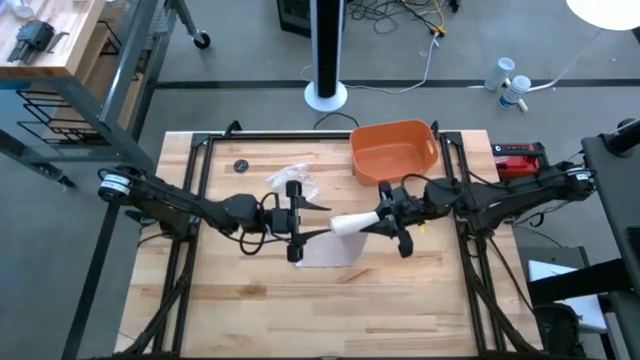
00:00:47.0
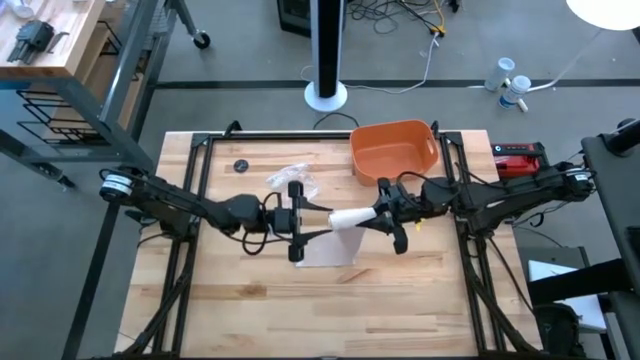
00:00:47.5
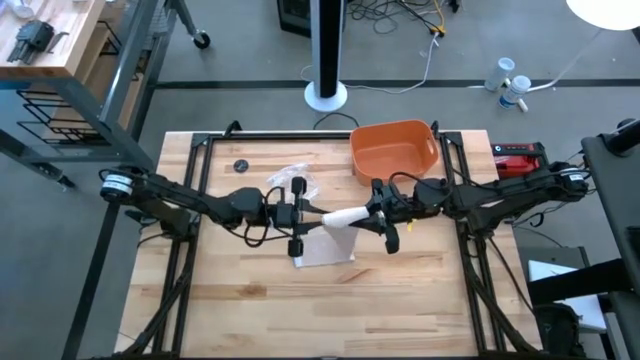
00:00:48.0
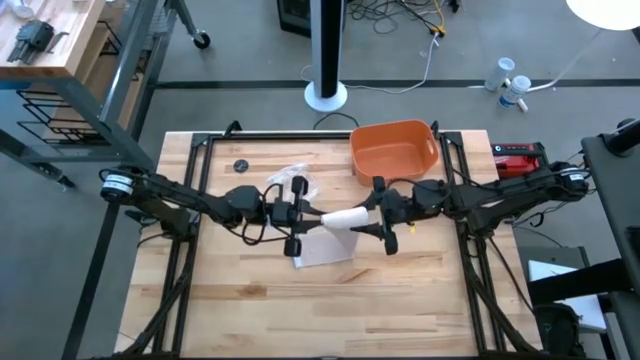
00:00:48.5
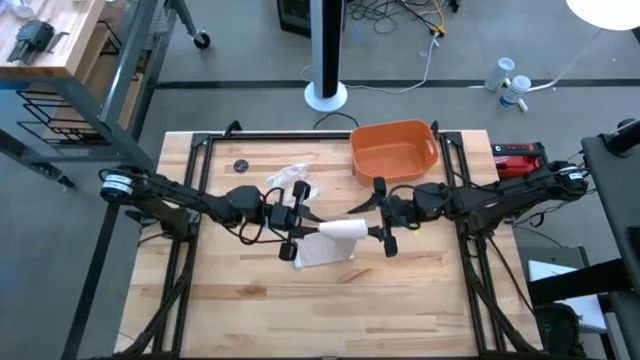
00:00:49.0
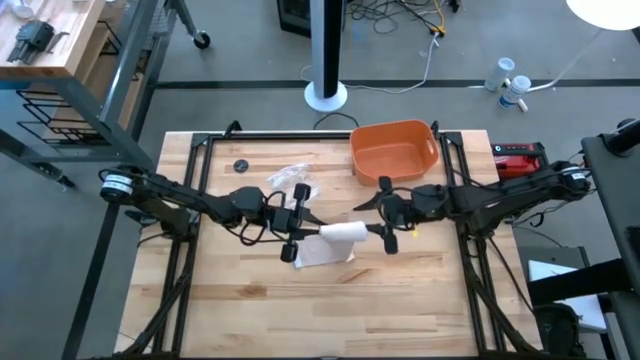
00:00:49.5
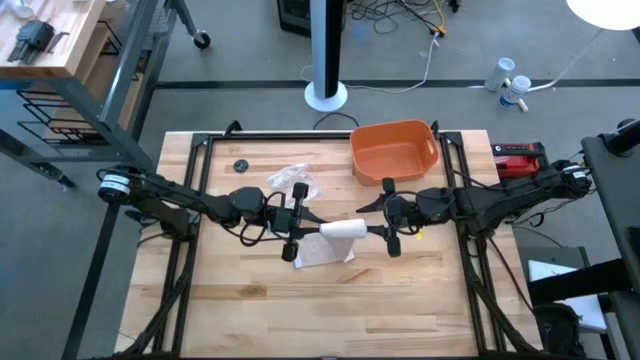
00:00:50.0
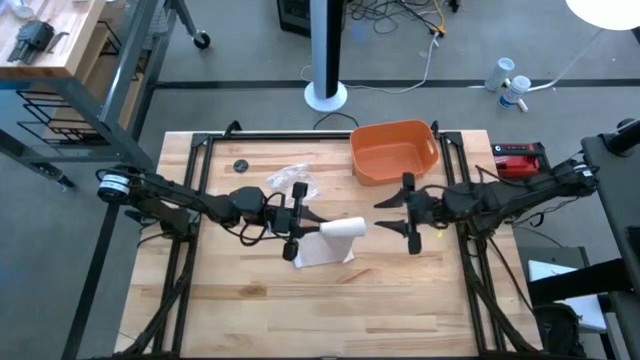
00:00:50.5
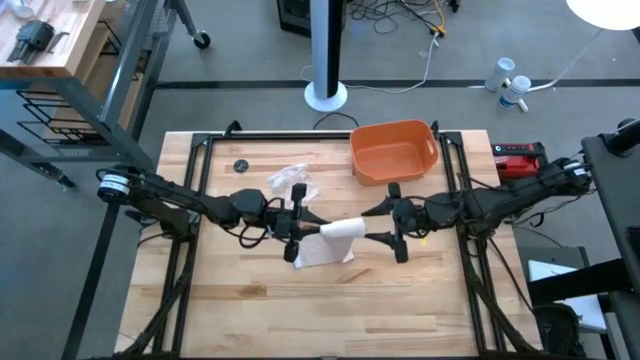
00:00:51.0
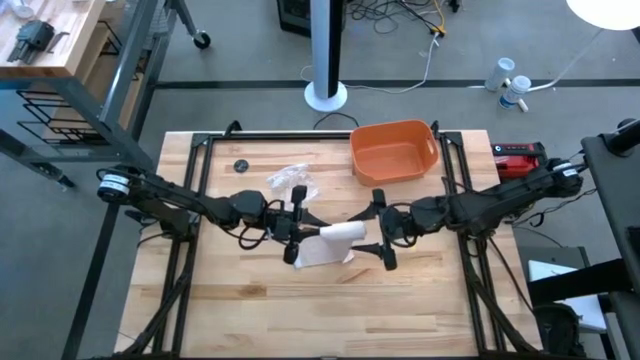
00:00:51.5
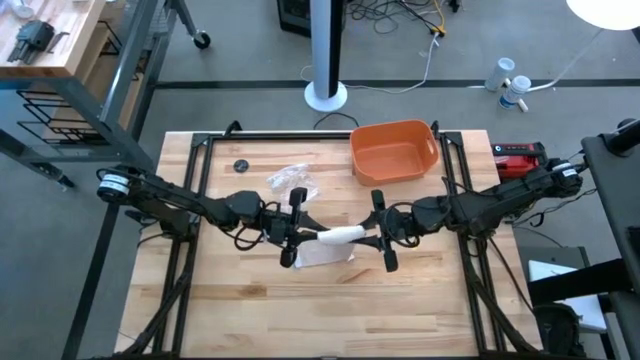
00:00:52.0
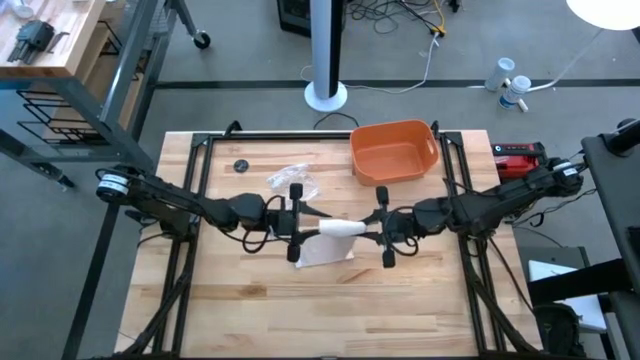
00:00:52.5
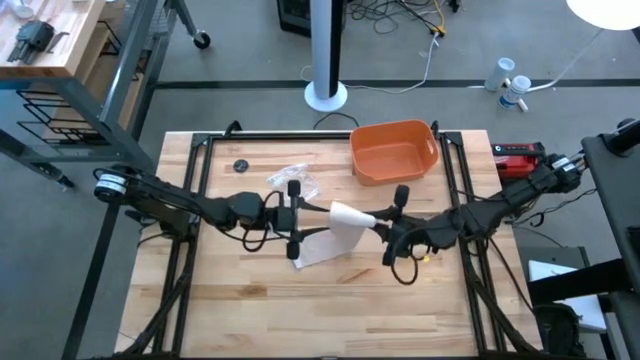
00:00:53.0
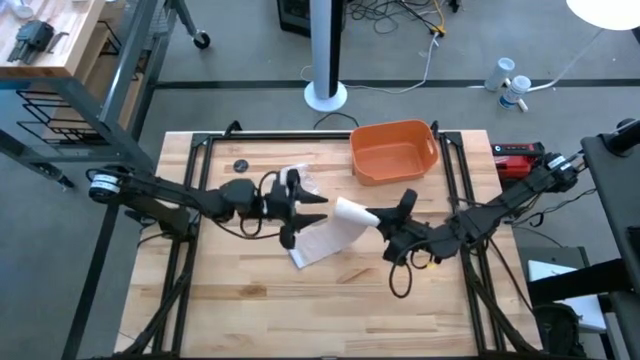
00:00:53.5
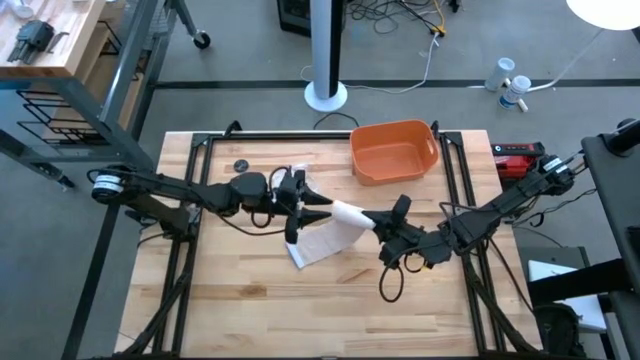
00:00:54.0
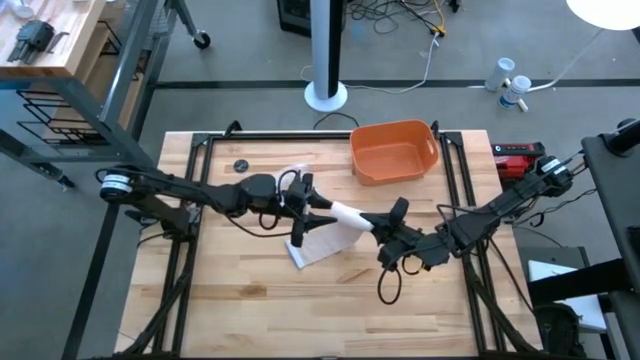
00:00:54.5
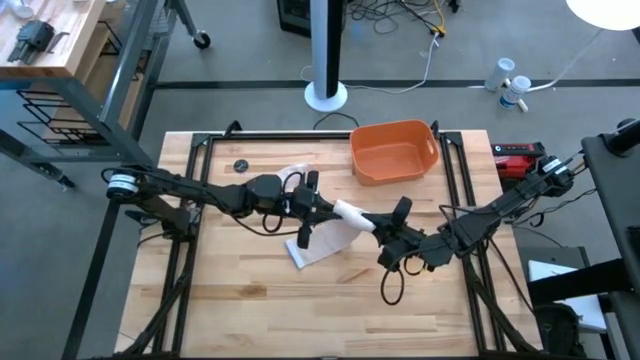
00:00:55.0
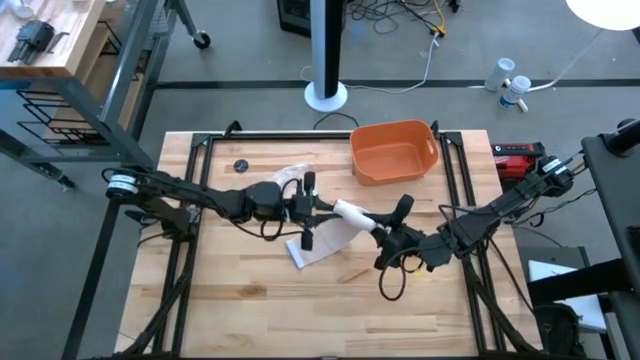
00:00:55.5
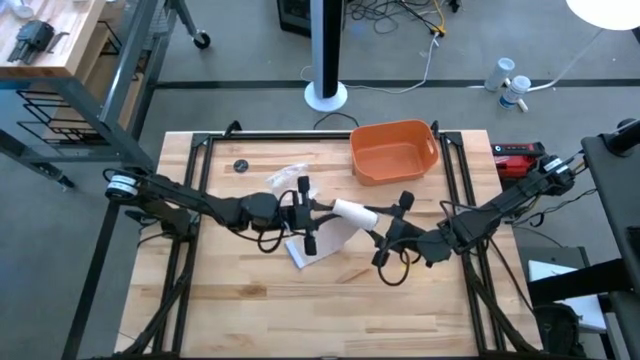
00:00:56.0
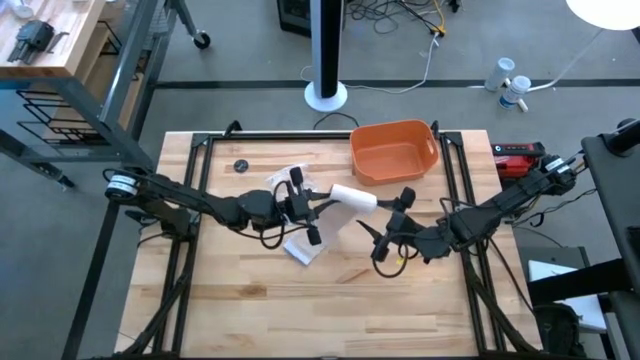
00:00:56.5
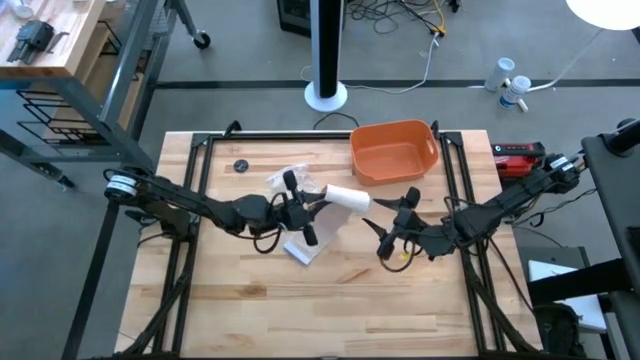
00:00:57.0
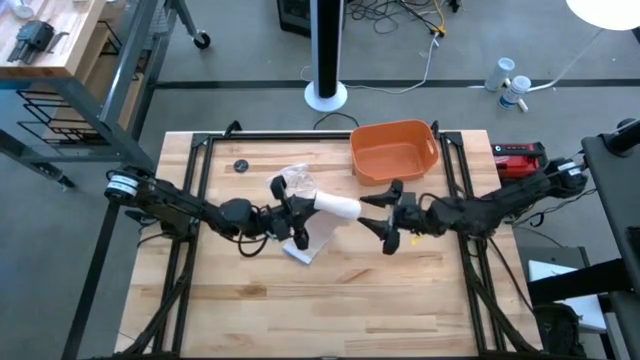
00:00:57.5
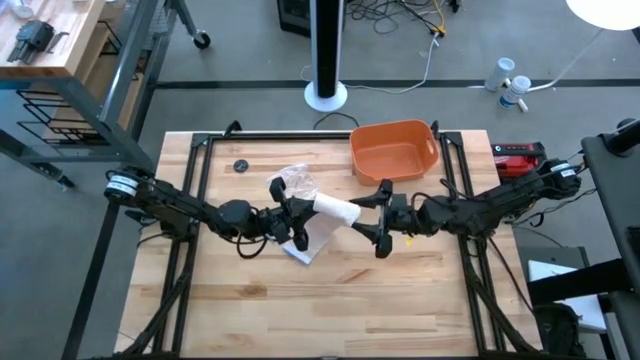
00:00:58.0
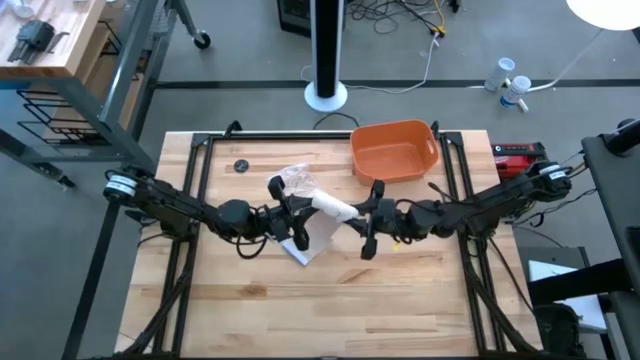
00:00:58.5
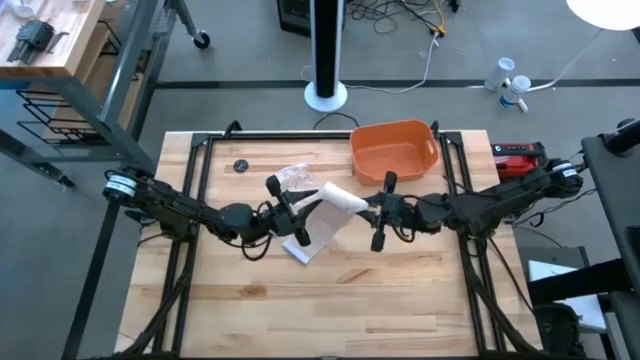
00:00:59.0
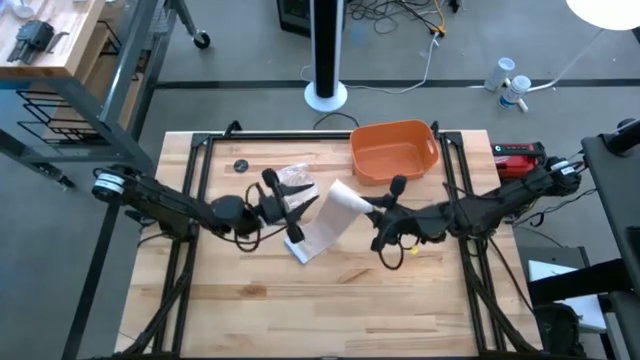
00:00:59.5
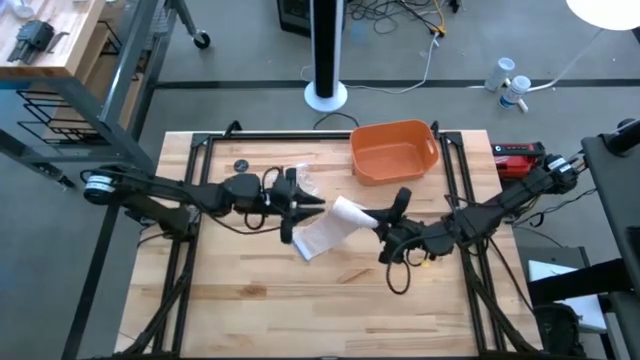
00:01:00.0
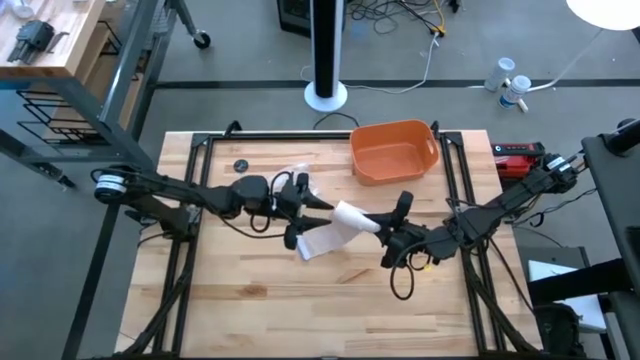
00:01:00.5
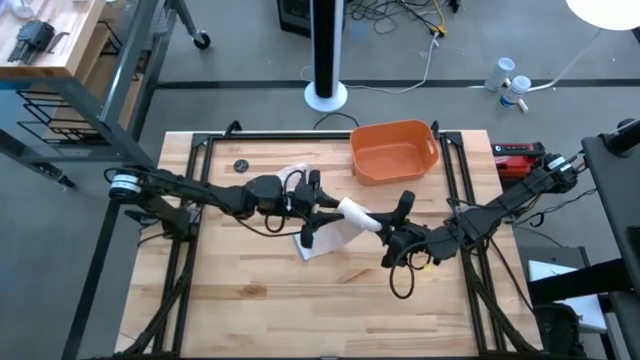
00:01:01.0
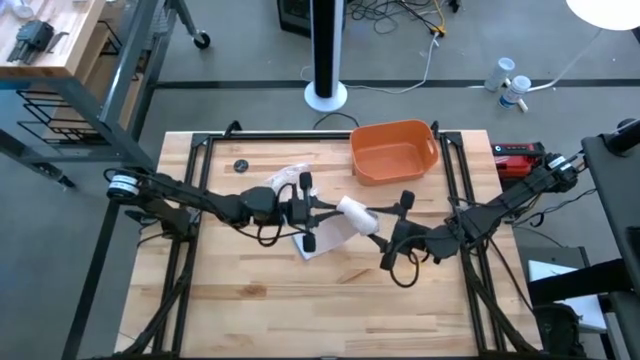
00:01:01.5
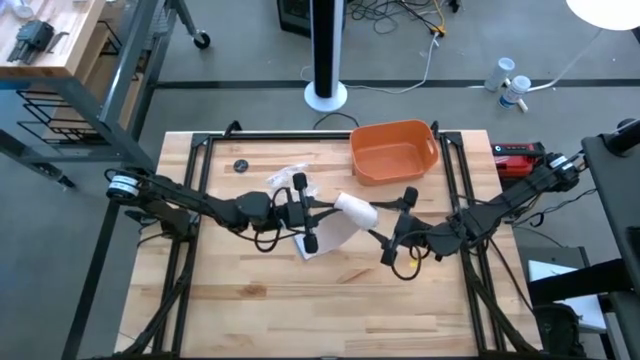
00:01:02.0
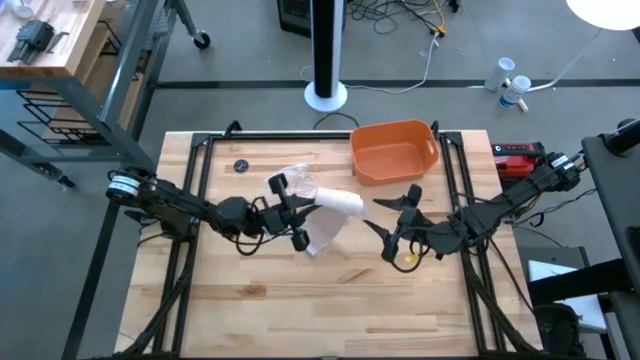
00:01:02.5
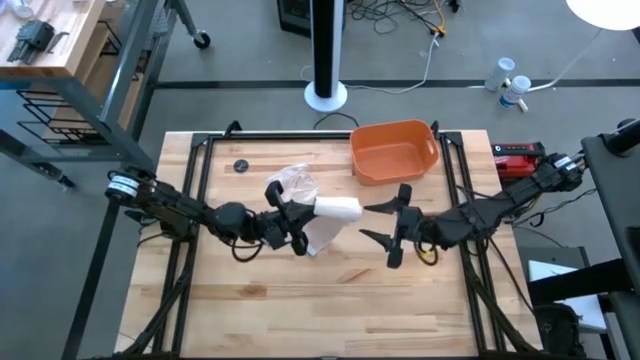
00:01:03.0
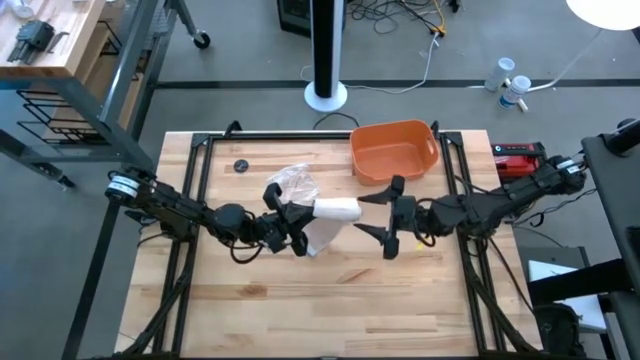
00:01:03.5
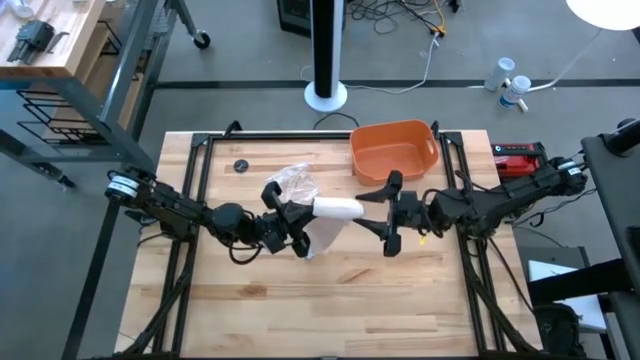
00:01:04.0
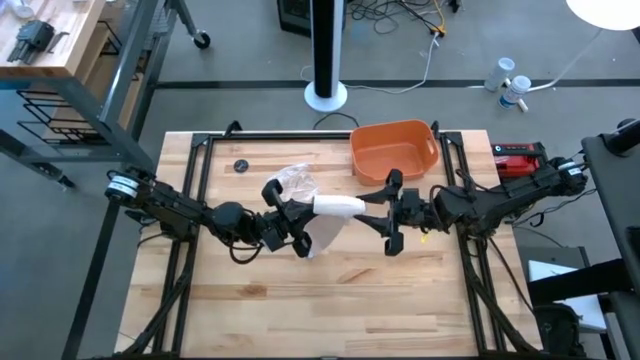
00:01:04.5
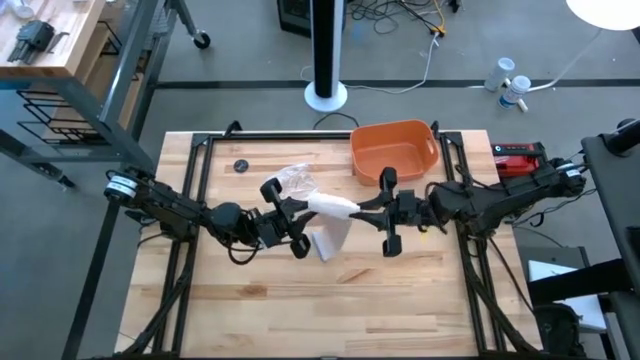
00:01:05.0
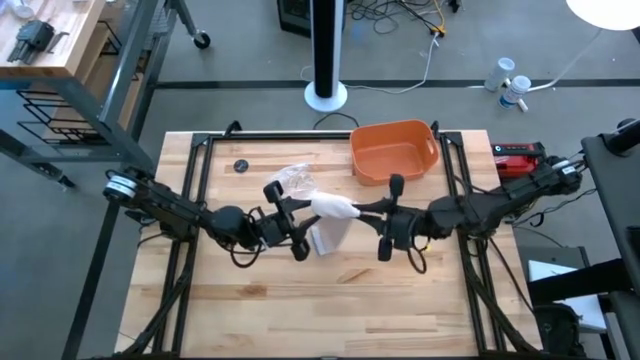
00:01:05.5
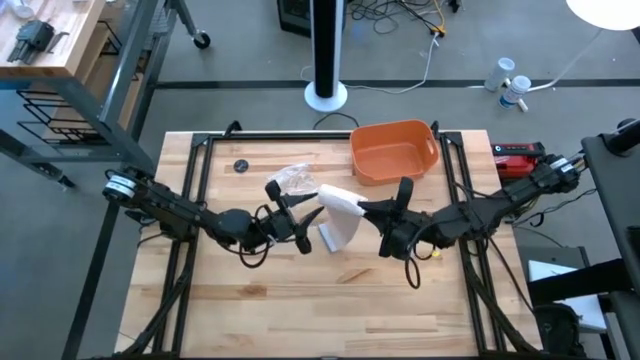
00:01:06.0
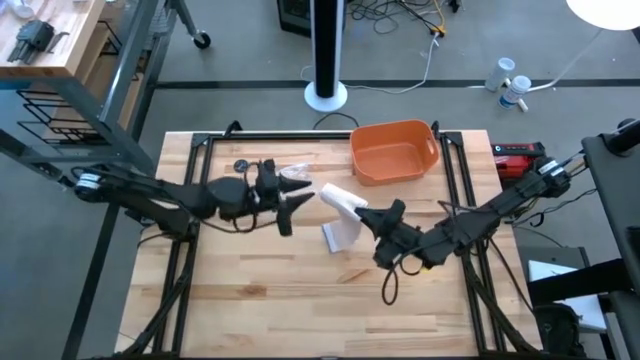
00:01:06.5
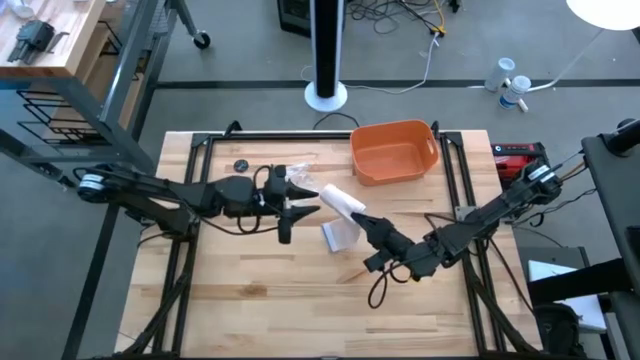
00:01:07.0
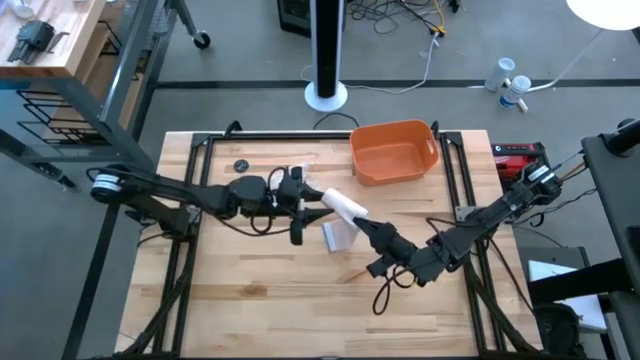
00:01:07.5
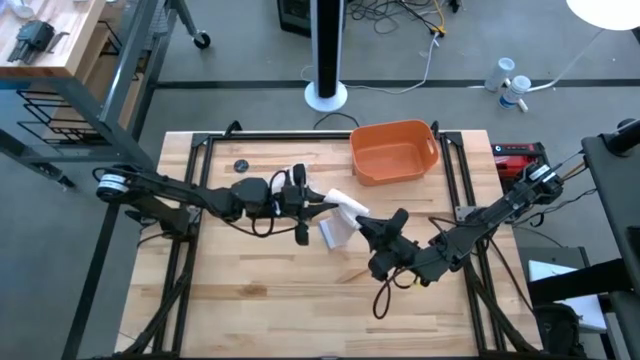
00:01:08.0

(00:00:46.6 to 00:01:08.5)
Task: Roll bandage
Roll the brown bandage
